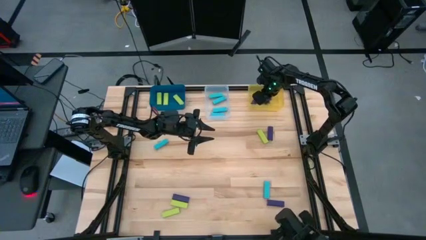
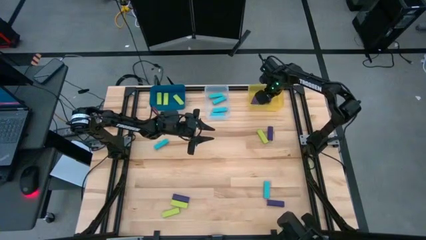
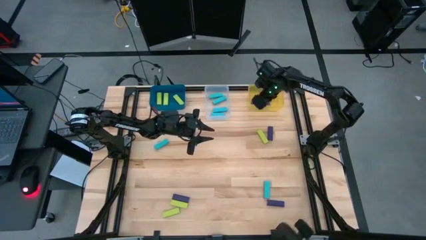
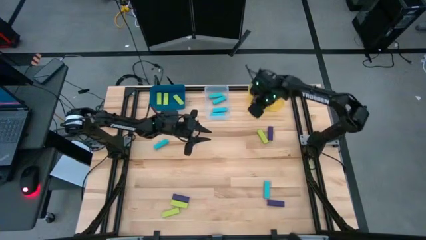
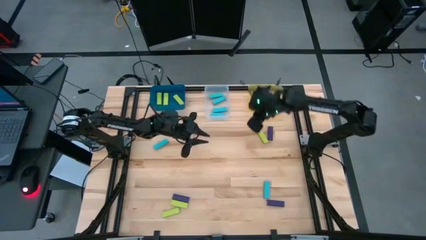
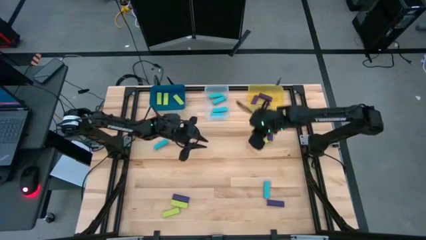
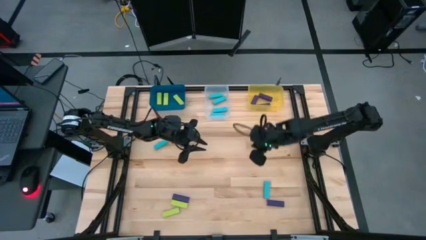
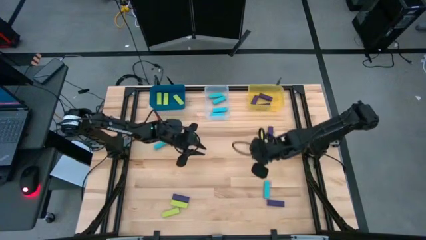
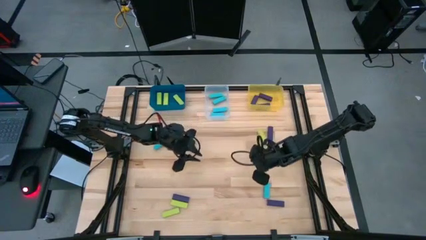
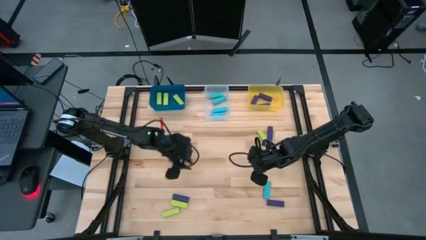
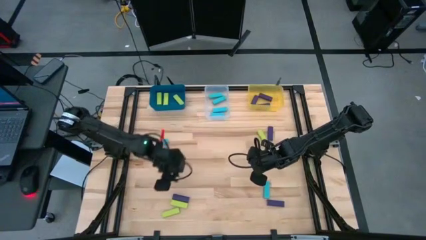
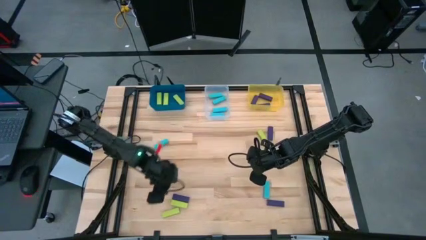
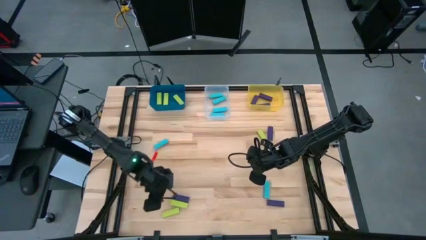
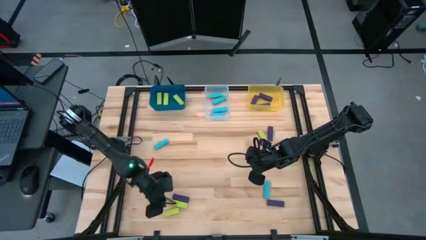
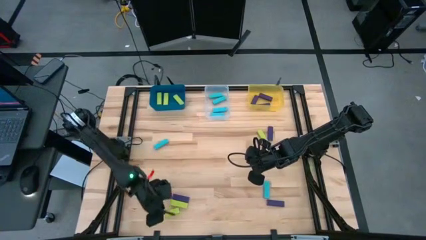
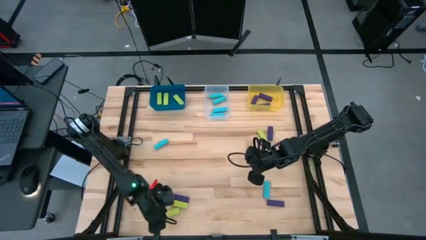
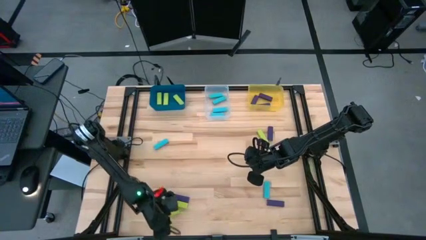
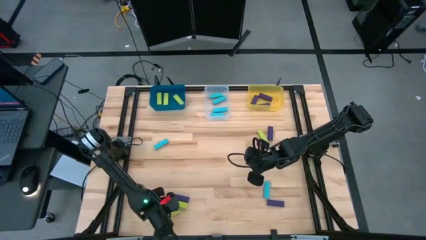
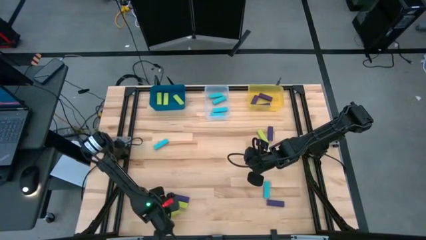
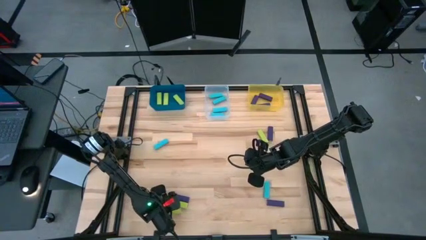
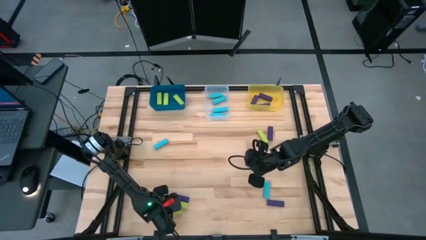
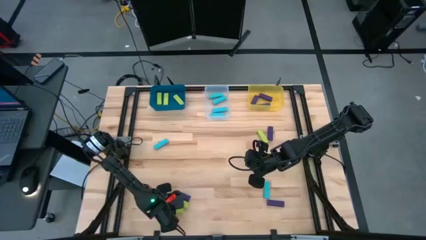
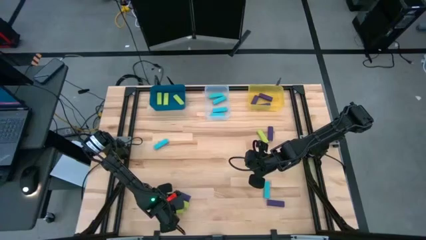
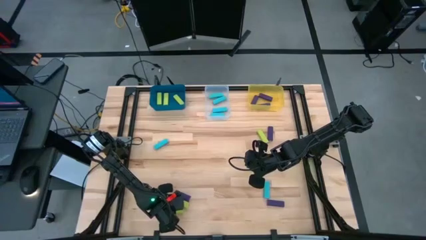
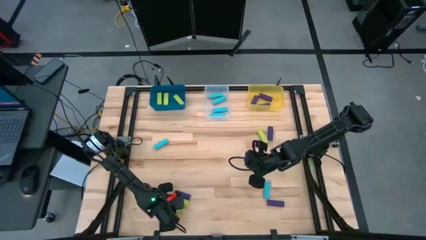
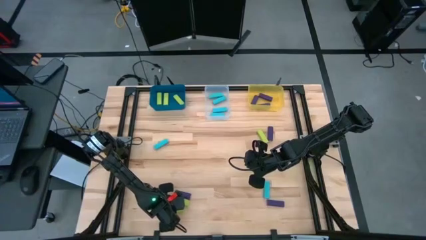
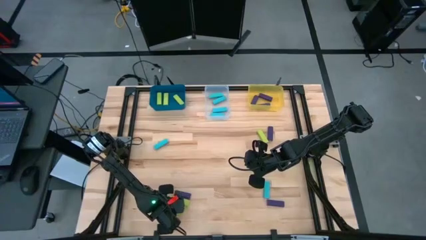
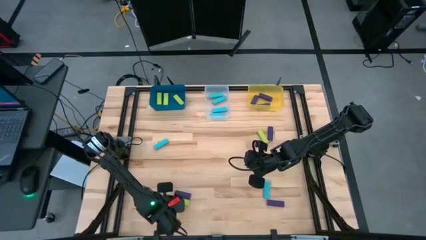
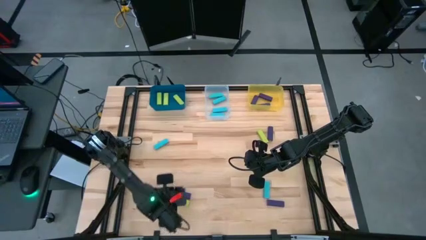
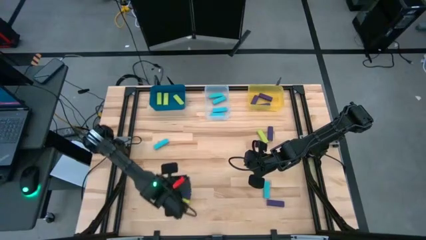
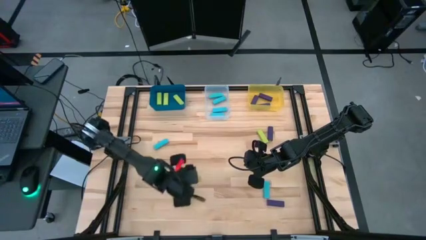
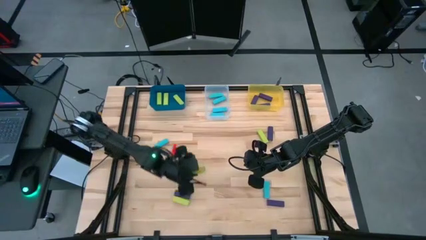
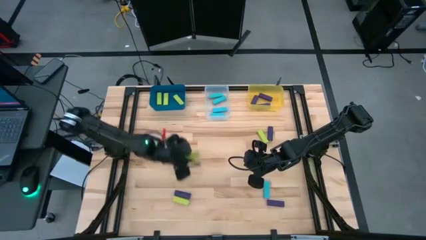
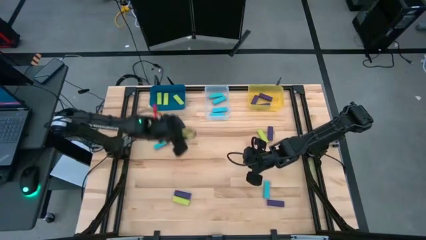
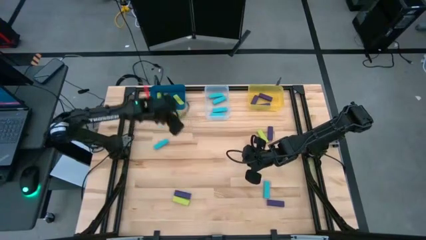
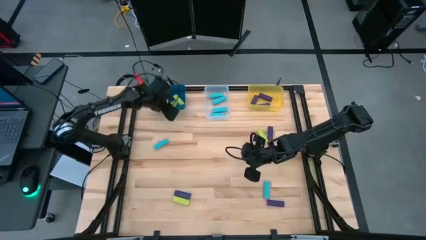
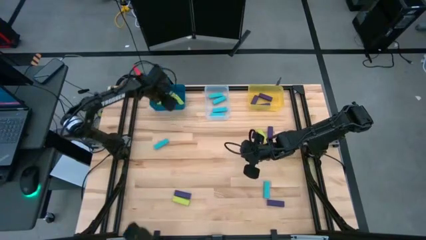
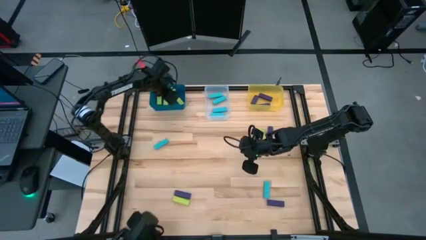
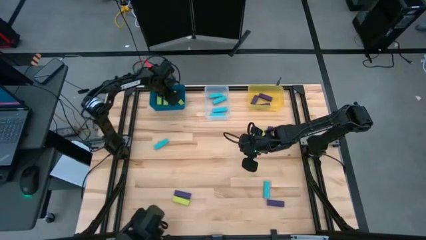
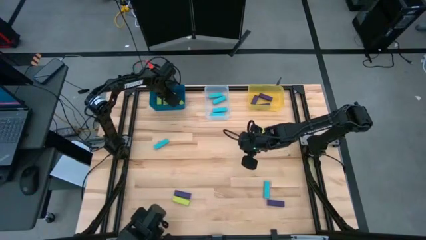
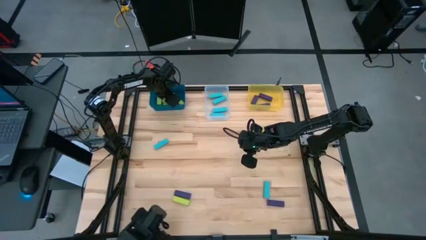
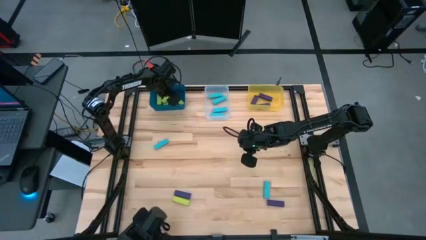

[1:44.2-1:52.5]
Task: Sort blocks
Put the green block into the blue bin

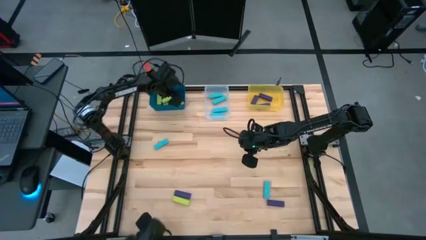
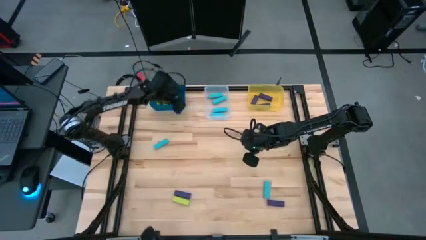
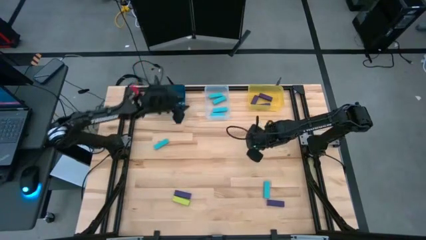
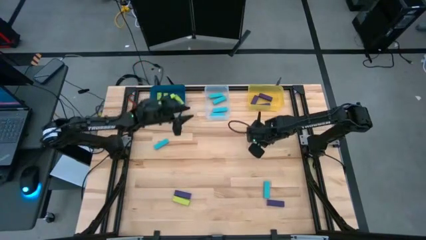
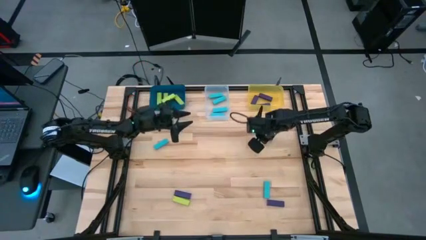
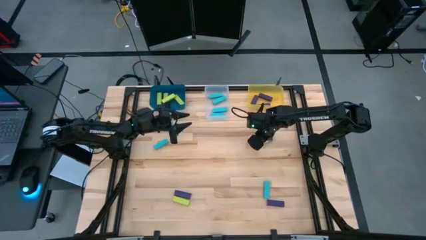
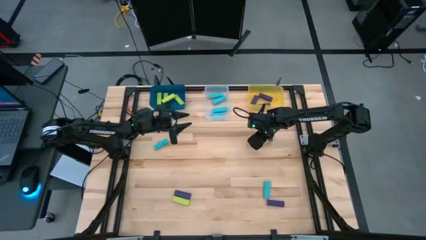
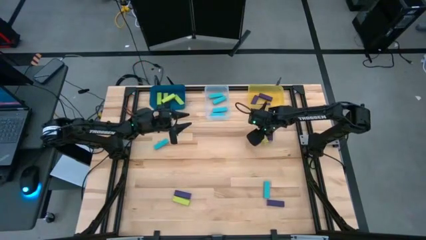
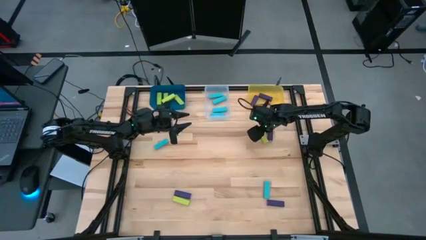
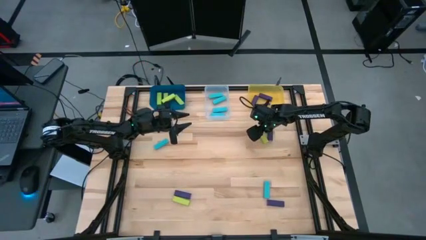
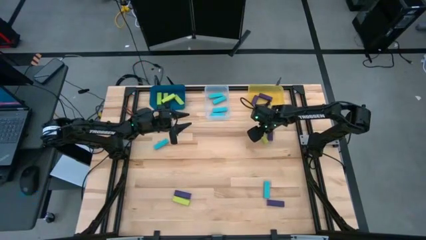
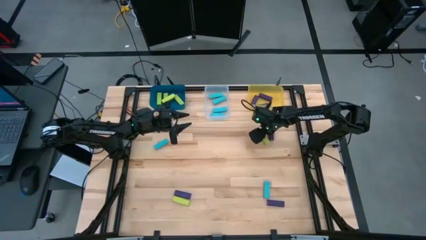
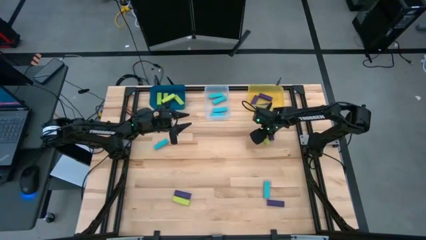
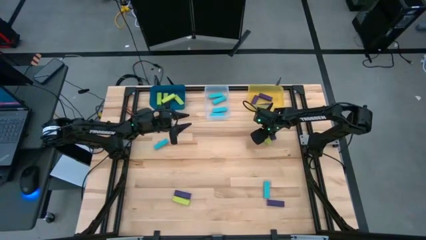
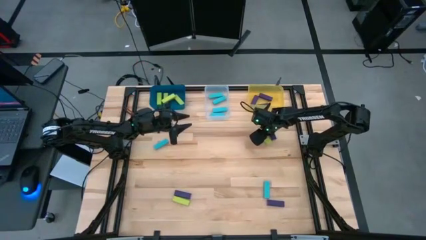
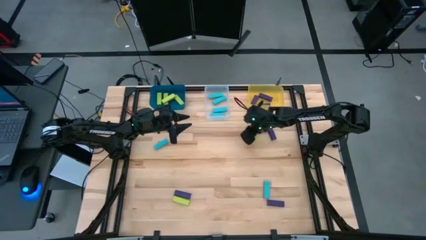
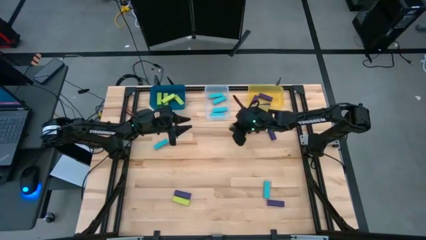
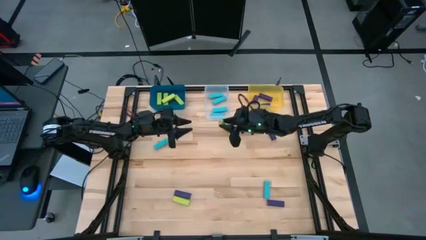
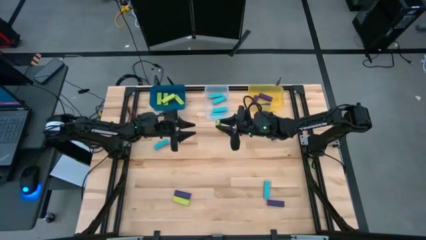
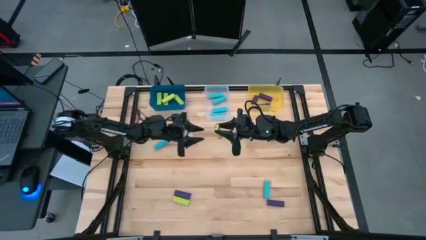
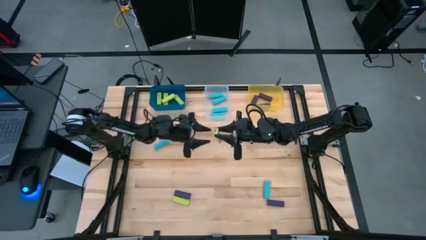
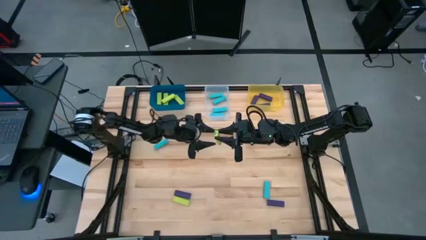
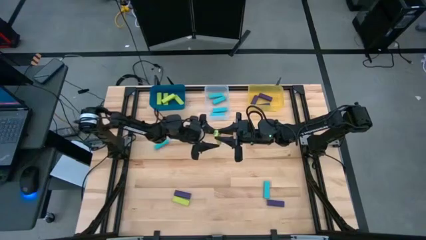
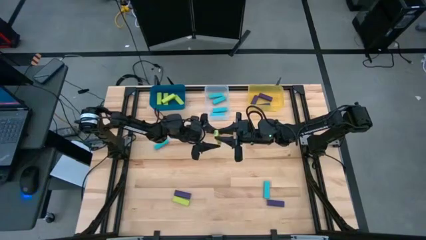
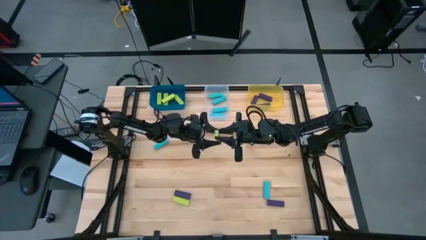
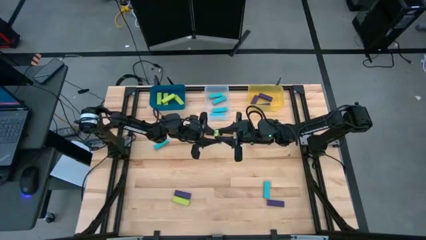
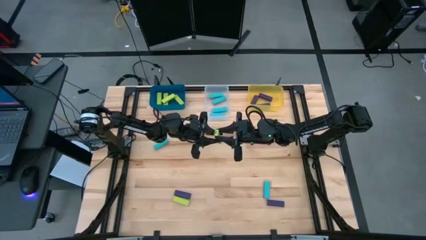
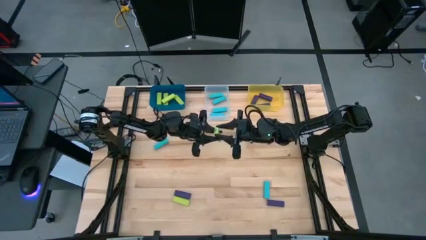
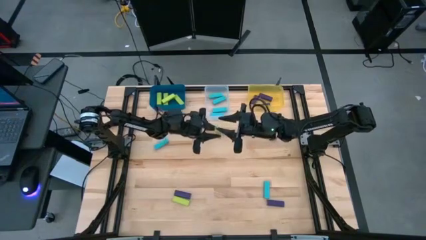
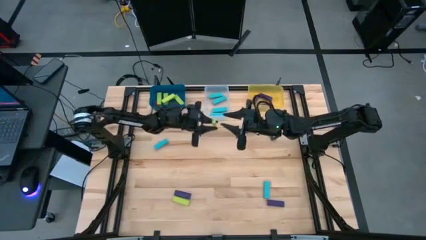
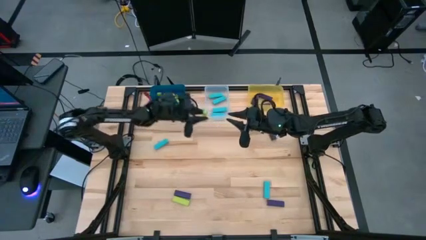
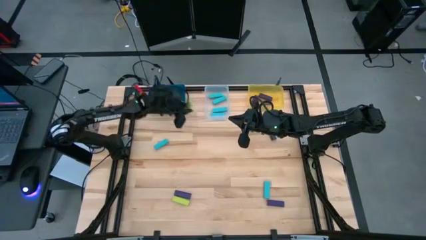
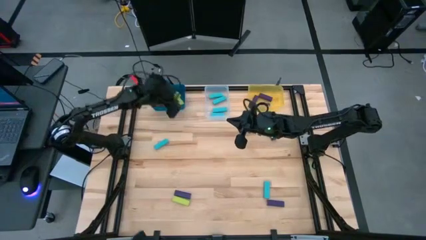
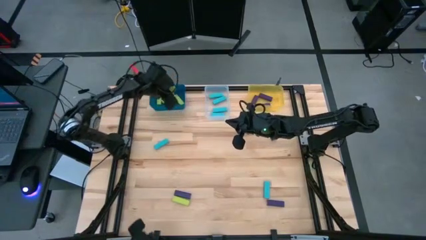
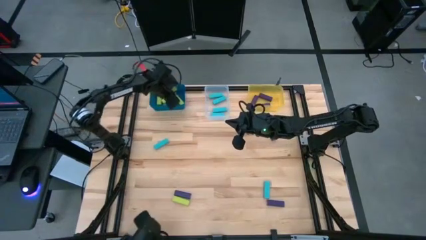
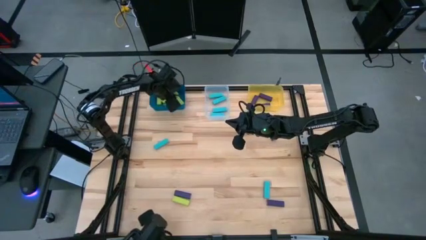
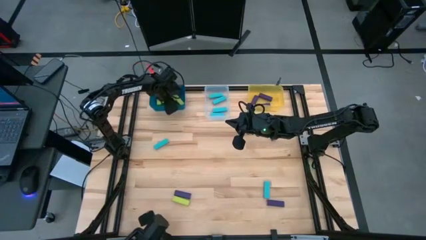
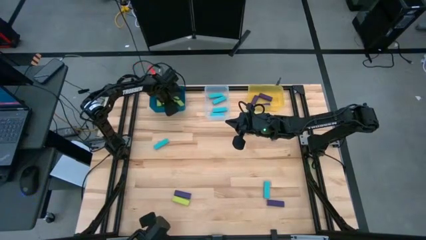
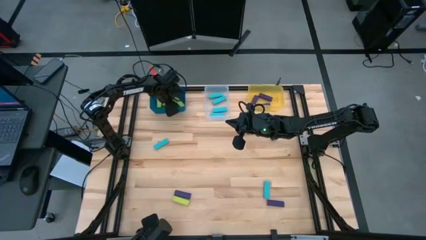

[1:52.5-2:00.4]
Put the green block into the blue bin
